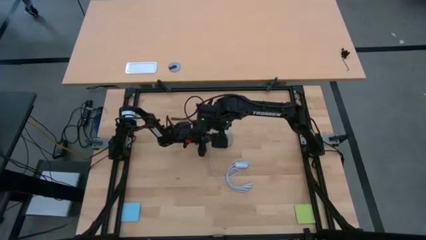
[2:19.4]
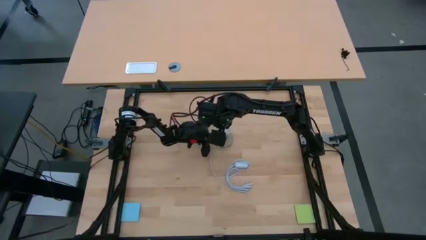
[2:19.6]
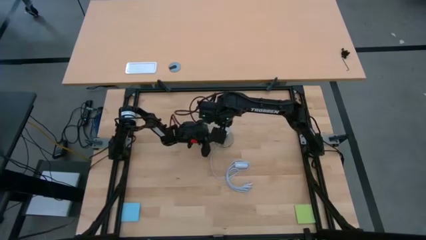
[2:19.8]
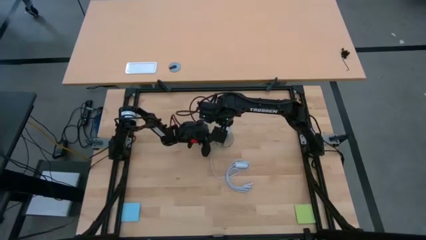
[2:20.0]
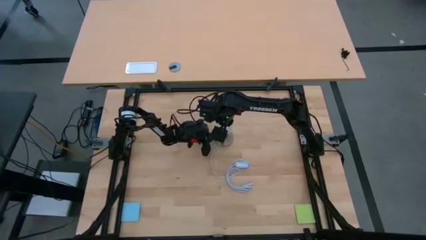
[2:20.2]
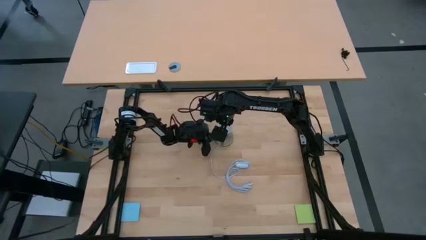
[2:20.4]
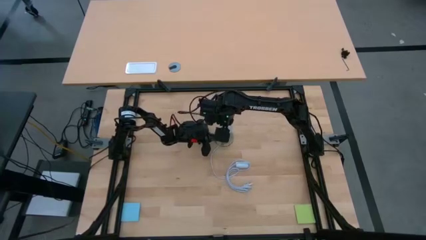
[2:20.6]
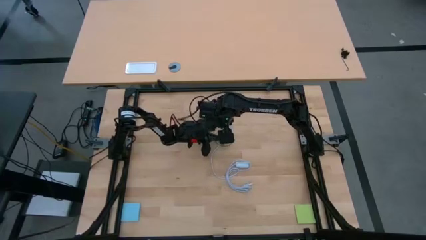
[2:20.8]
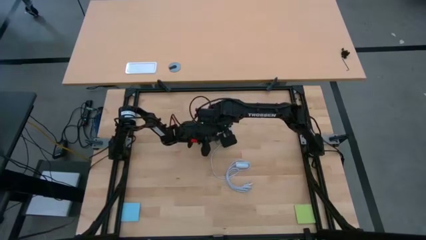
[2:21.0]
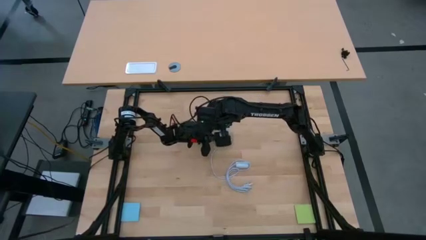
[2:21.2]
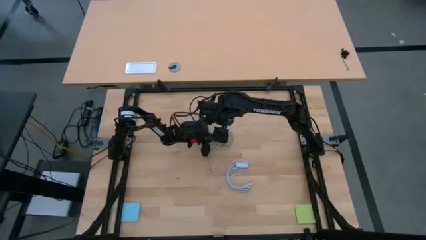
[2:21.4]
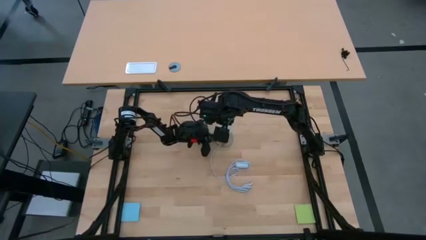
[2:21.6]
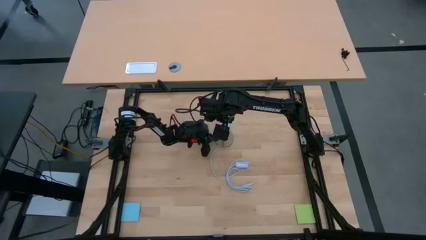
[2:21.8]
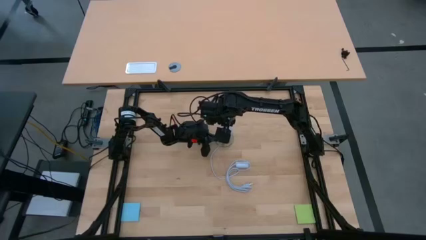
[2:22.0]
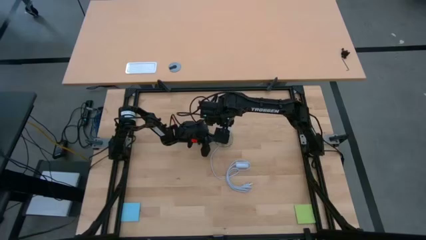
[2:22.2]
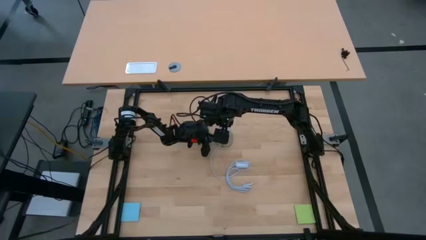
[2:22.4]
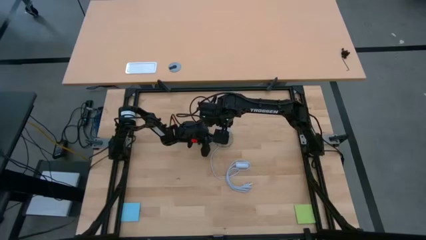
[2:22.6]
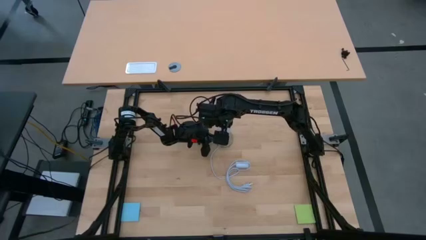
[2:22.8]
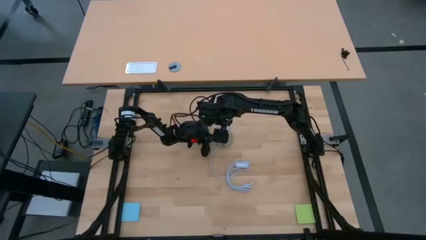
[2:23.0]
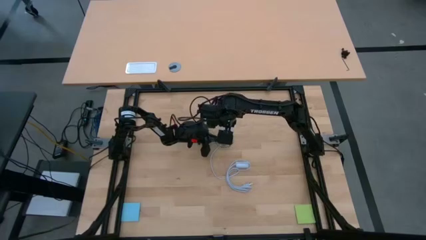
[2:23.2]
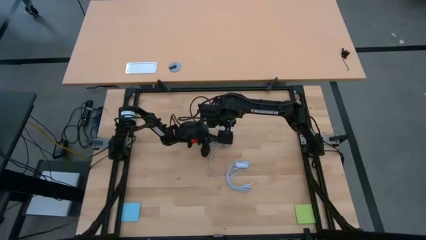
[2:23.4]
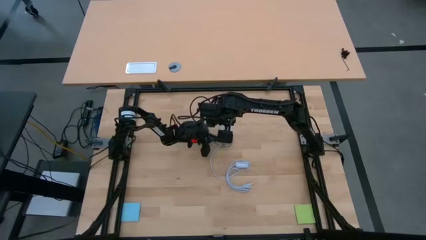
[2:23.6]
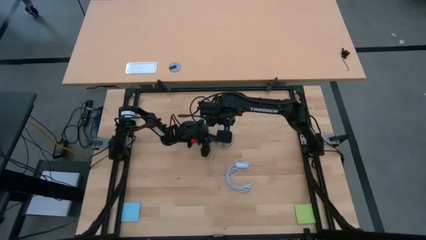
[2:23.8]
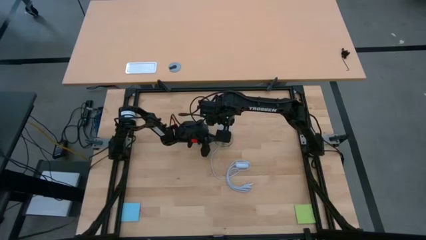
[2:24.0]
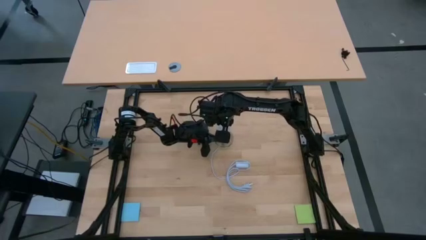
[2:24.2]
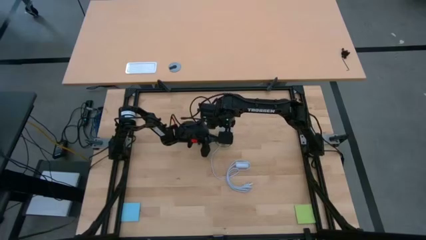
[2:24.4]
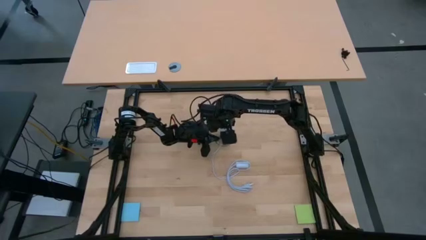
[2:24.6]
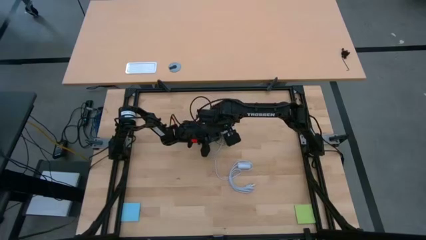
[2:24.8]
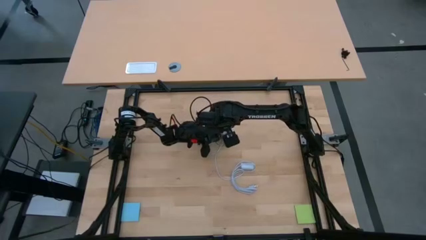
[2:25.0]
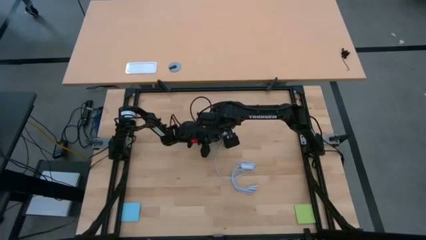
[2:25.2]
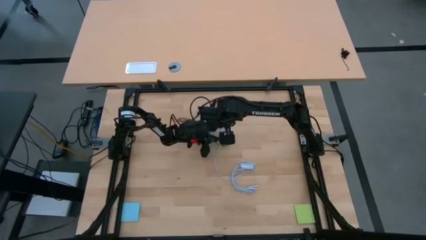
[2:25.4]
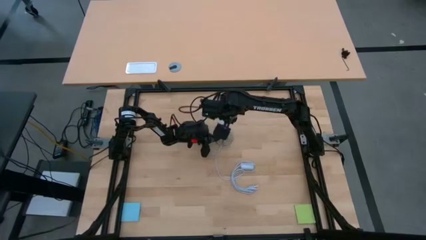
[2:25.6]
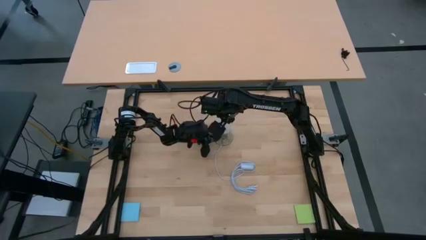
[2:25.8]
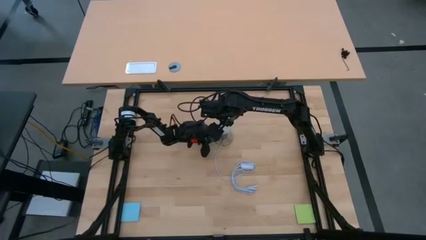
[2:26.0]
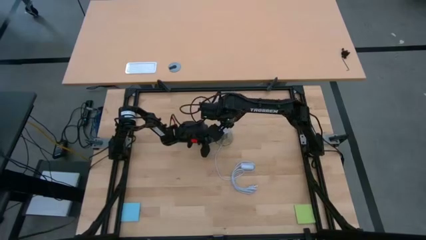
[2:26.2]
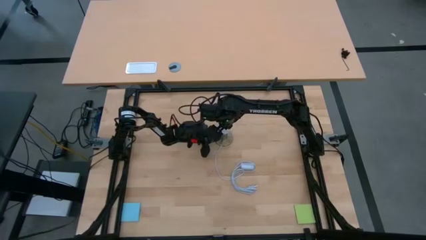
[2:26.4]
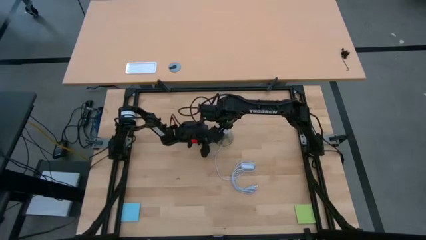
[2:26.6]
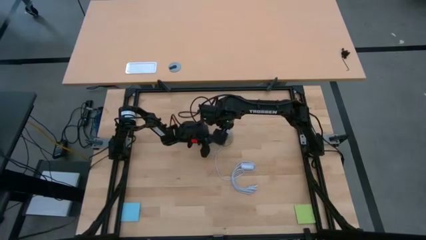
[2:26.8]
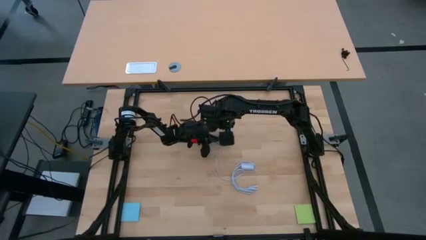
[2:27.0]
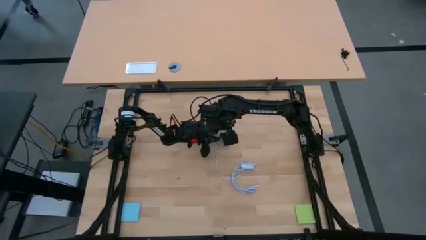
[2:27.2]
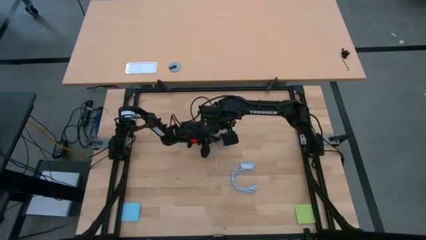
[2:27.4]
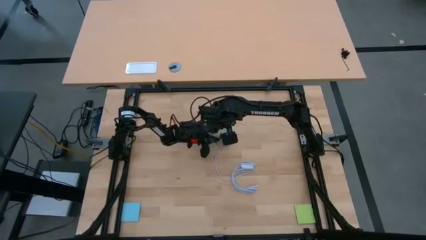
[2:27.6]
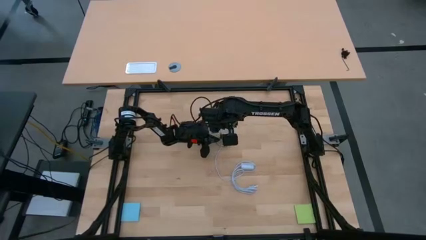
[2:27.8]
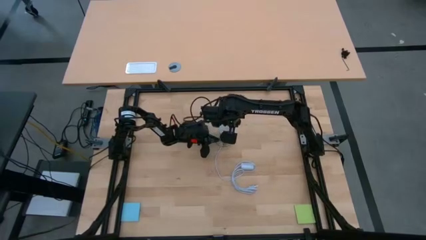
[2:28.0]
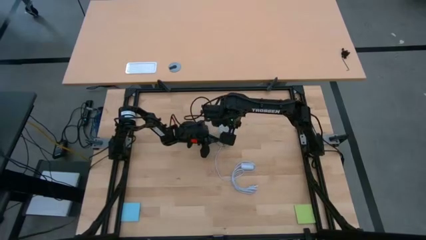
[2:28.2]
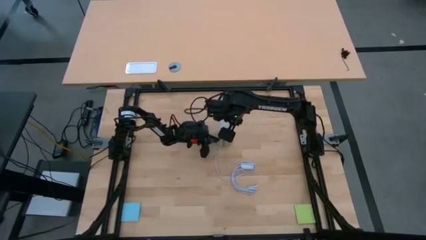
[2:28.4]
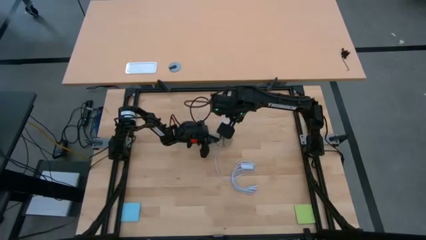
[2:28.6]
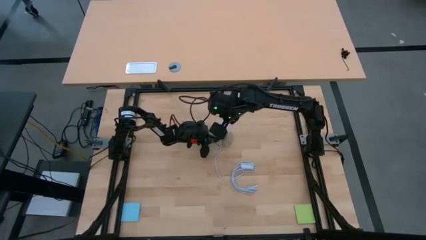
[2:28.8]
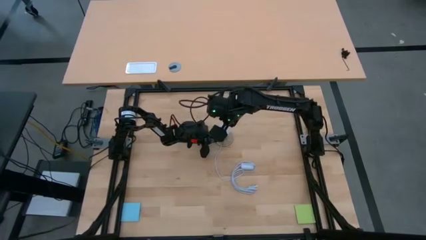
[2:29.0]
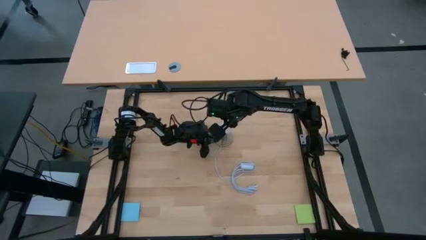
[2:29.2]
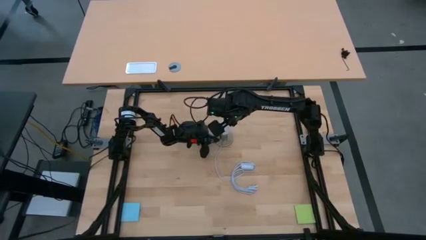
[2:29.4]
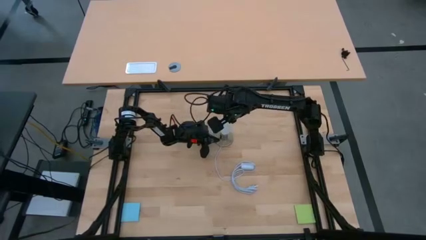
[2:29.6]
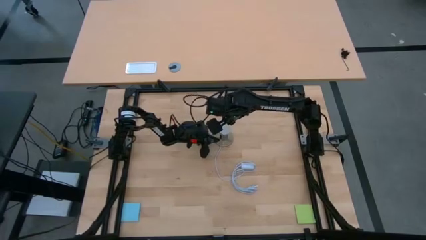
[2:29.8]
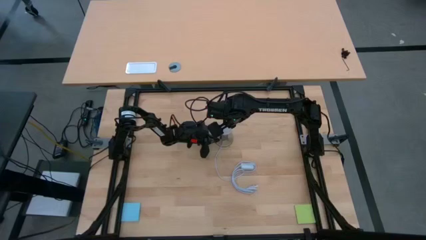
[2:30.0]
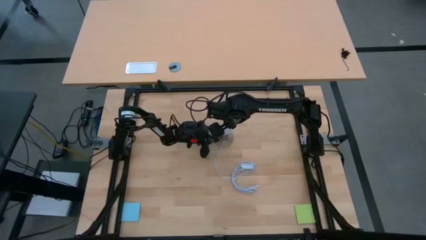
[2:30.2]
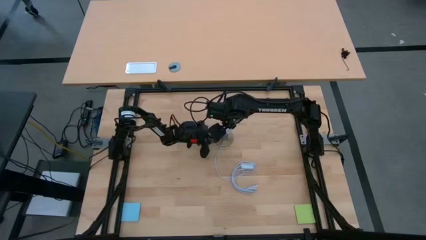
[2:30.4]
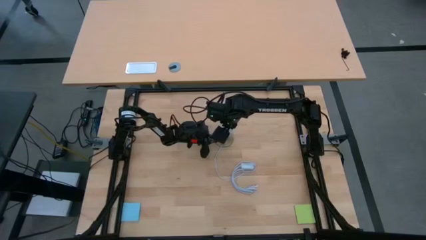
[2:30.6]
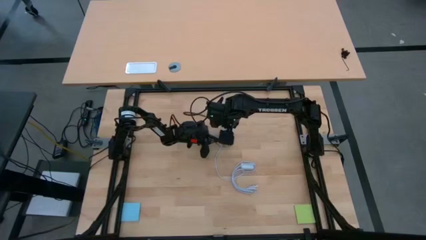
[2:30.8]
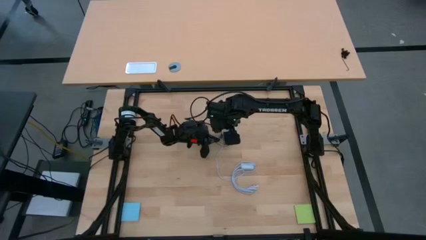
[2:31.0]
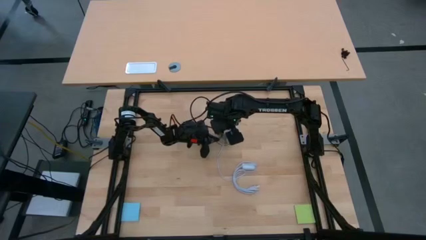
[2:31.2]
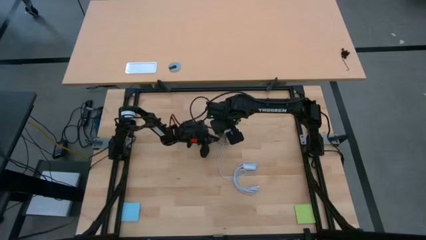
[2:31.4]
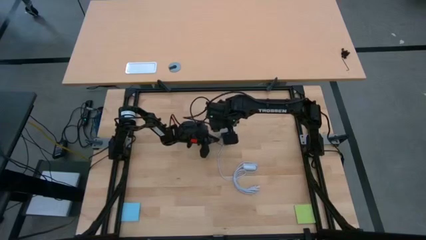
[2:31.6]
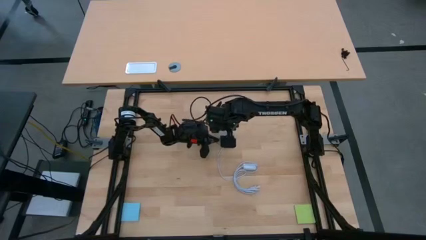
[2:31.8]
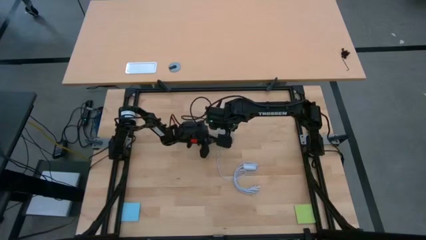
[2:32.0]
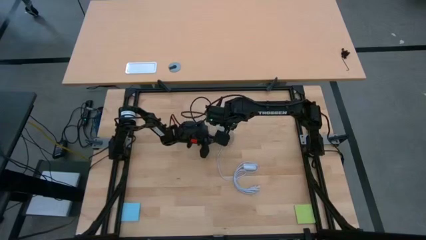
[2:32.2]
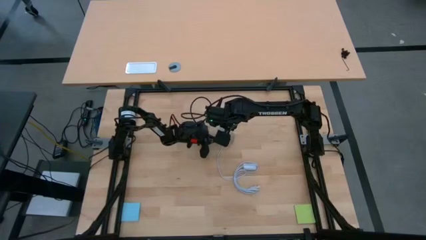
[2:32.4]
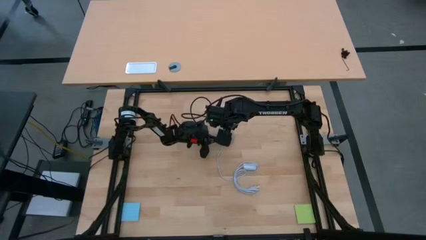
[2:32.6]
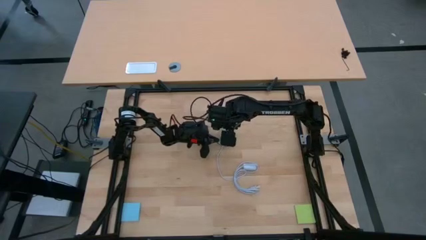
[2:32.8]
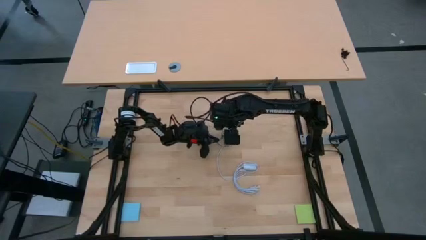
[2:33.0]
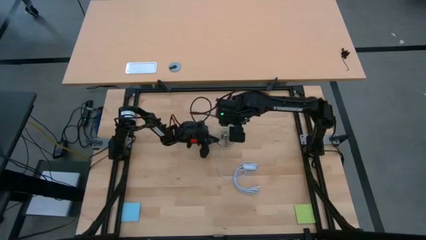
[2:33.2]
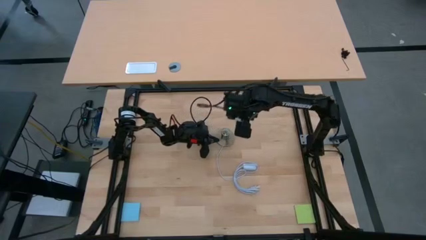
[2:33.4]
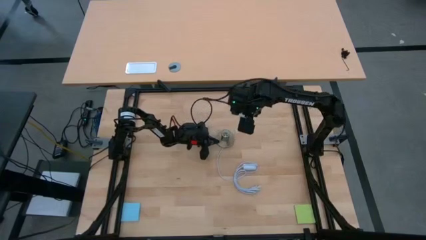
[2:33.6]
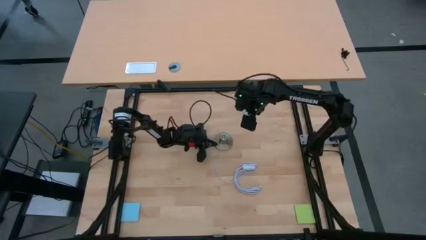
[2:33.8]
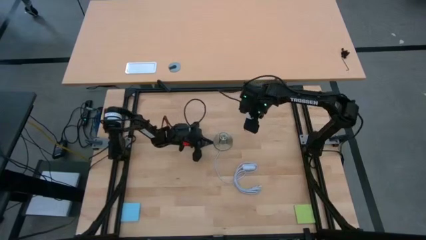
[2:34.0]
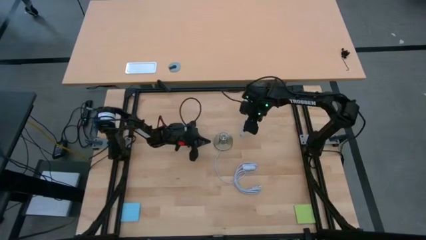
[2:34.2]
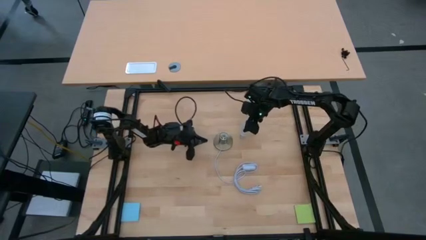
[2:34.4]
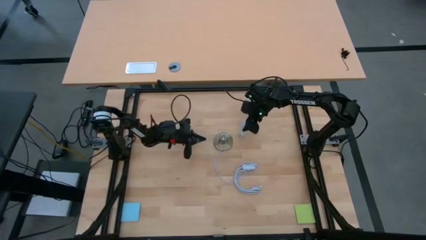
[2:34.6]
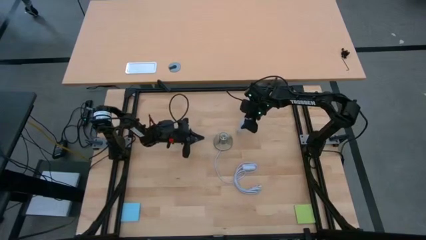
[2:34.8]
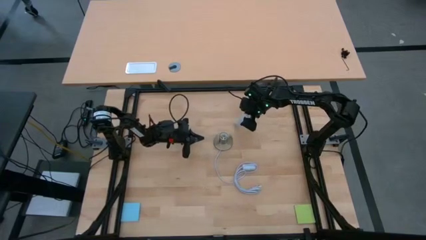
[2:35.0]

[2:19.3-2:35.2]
Task: Screw lightbulb
Remove the white lightbulb from the golden lamp
